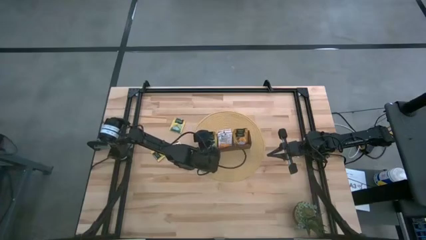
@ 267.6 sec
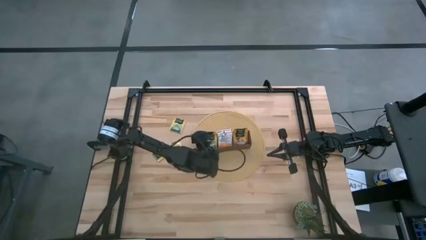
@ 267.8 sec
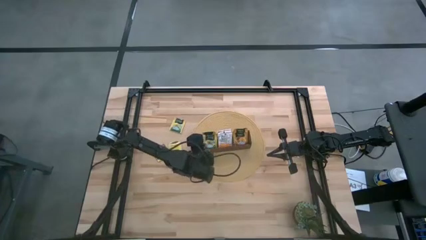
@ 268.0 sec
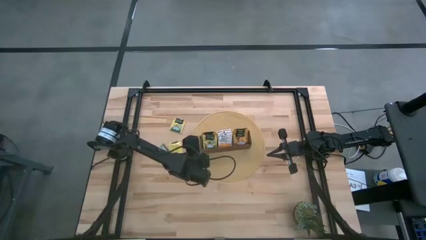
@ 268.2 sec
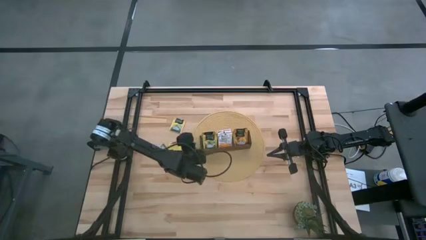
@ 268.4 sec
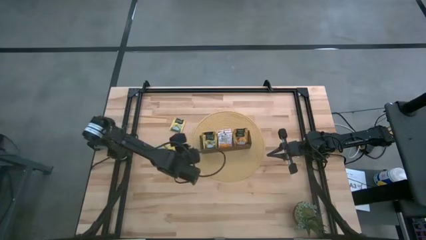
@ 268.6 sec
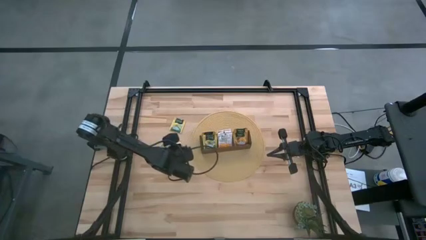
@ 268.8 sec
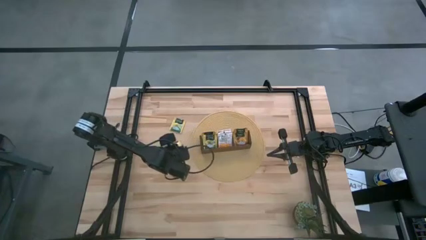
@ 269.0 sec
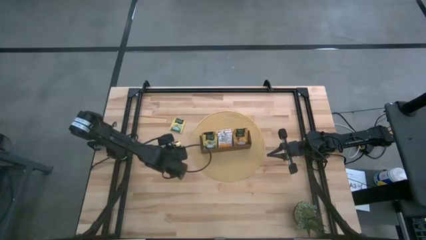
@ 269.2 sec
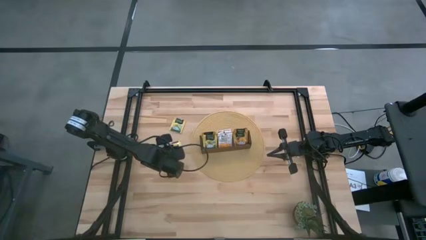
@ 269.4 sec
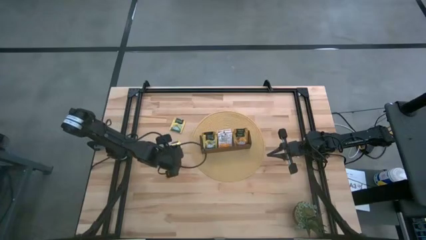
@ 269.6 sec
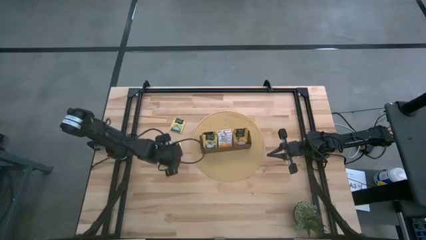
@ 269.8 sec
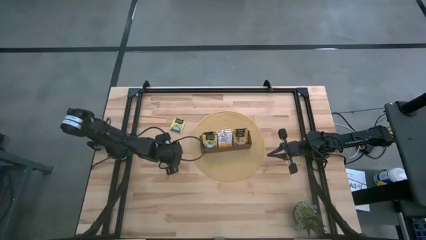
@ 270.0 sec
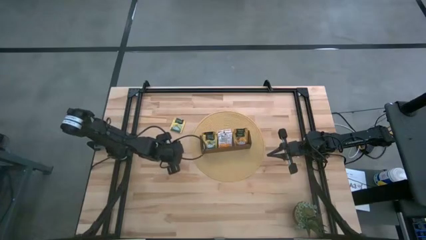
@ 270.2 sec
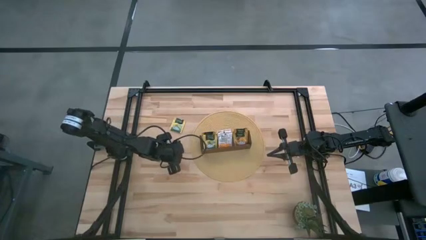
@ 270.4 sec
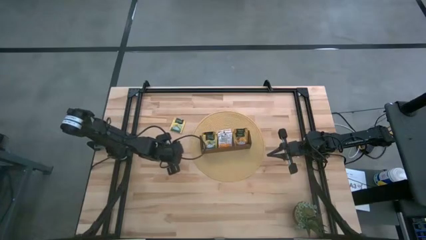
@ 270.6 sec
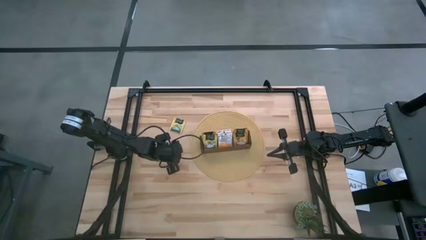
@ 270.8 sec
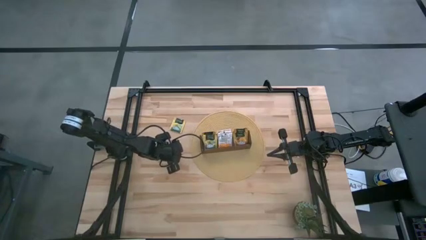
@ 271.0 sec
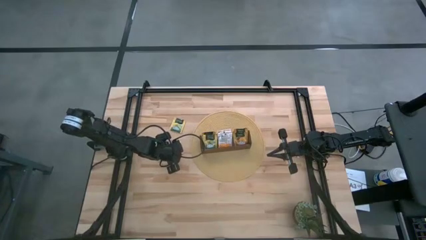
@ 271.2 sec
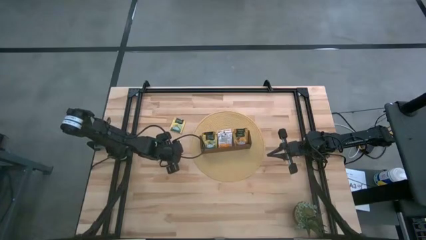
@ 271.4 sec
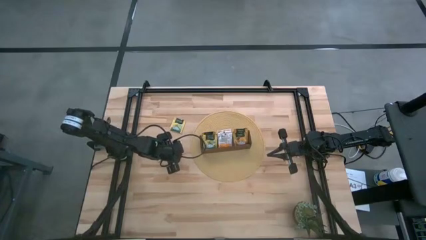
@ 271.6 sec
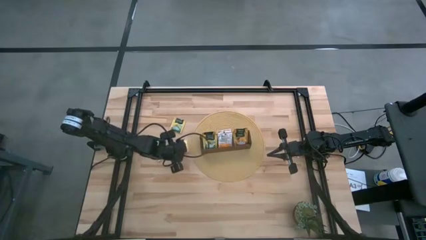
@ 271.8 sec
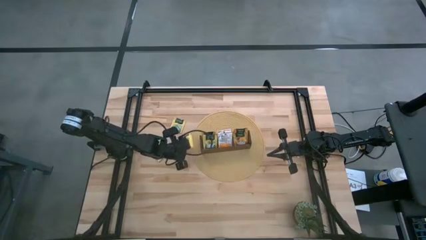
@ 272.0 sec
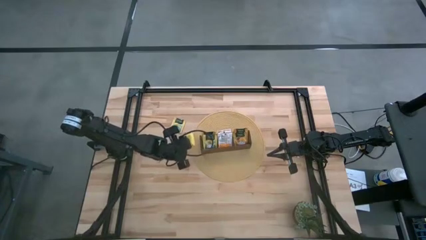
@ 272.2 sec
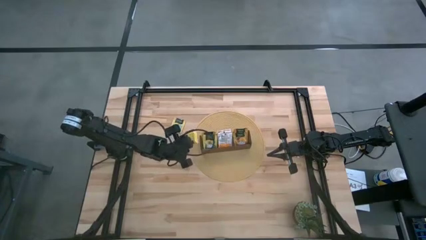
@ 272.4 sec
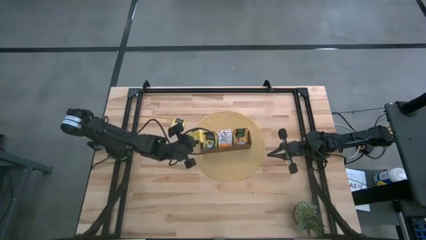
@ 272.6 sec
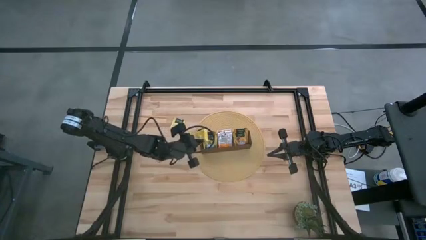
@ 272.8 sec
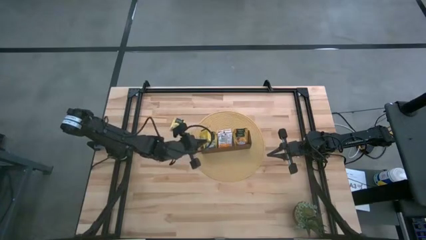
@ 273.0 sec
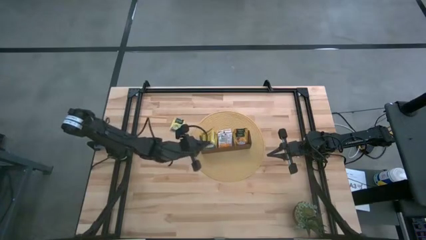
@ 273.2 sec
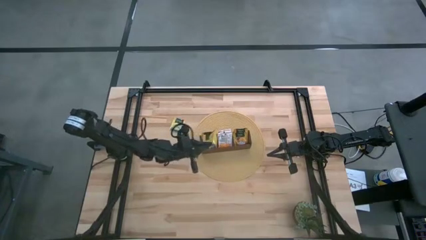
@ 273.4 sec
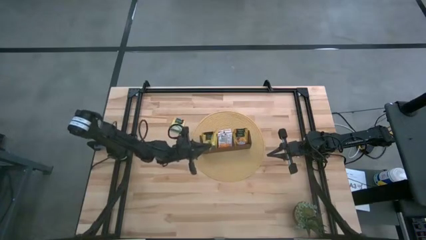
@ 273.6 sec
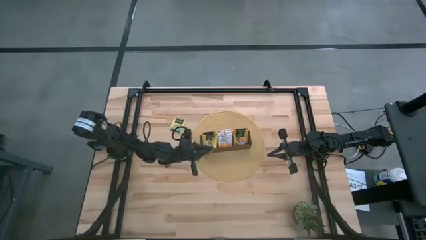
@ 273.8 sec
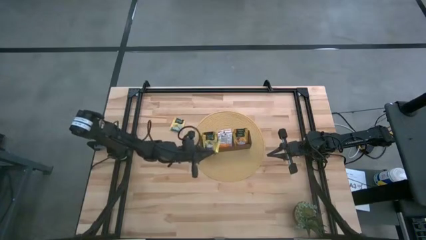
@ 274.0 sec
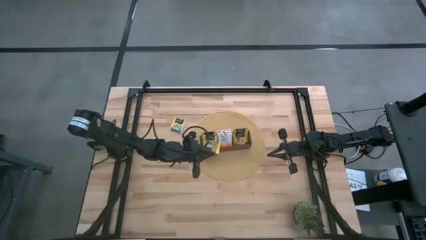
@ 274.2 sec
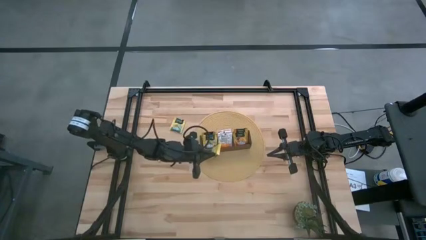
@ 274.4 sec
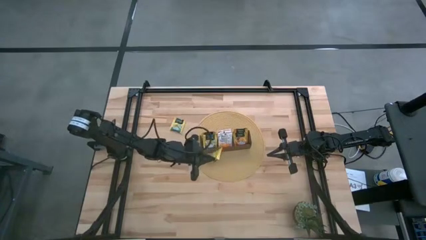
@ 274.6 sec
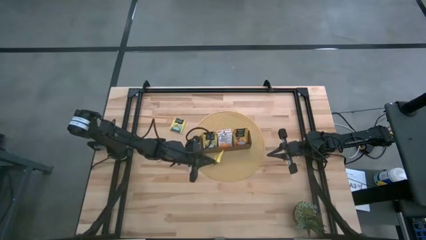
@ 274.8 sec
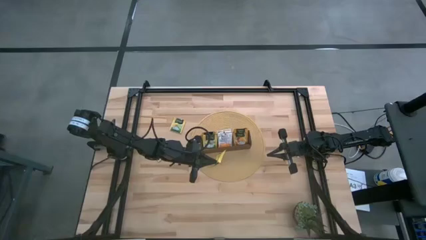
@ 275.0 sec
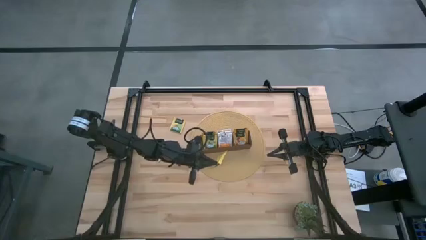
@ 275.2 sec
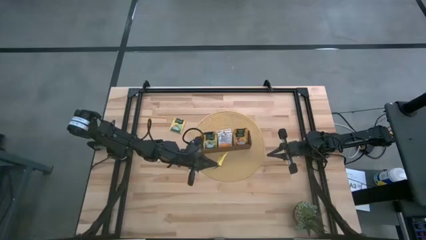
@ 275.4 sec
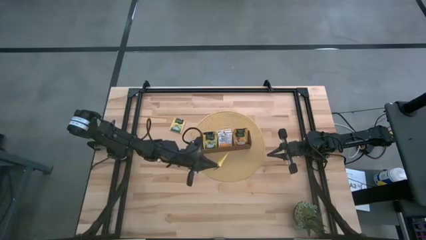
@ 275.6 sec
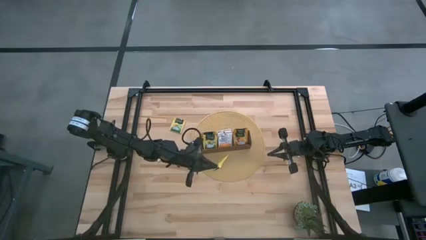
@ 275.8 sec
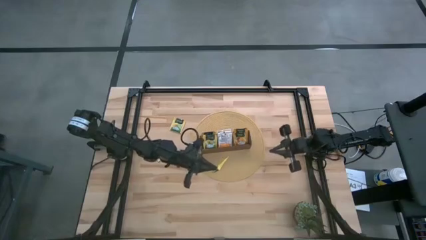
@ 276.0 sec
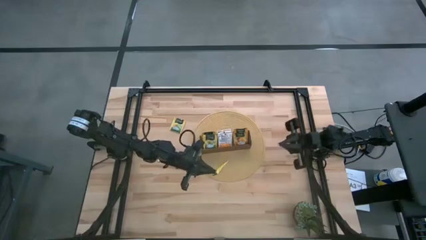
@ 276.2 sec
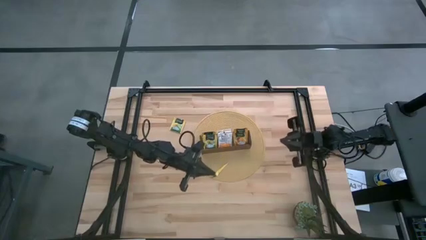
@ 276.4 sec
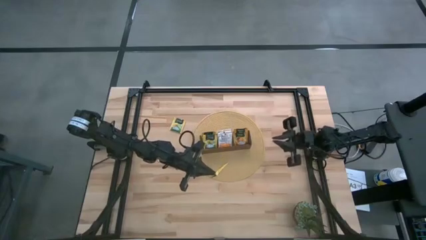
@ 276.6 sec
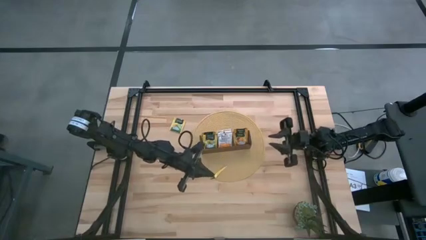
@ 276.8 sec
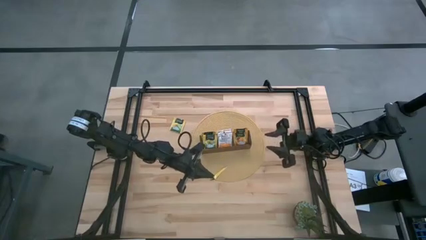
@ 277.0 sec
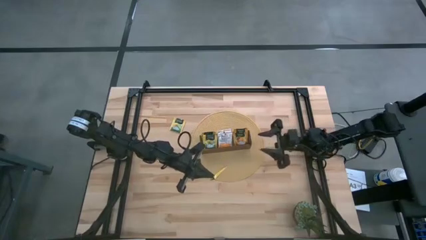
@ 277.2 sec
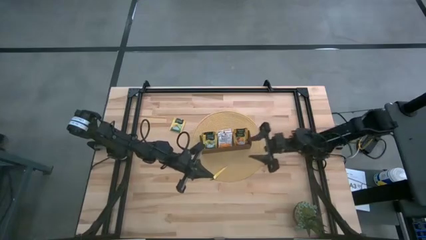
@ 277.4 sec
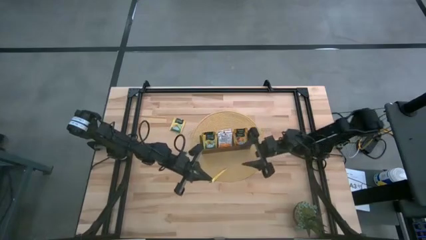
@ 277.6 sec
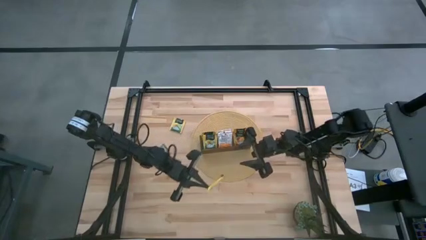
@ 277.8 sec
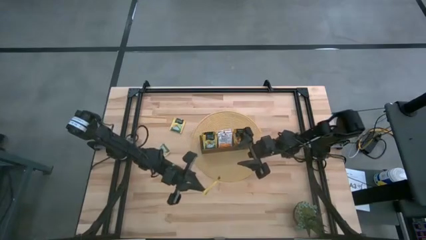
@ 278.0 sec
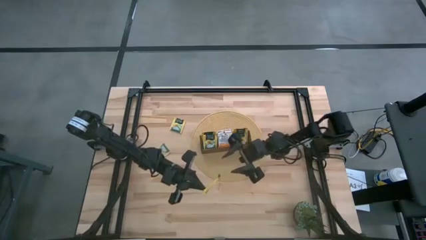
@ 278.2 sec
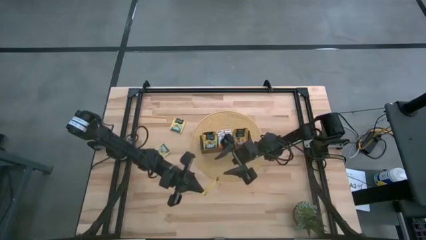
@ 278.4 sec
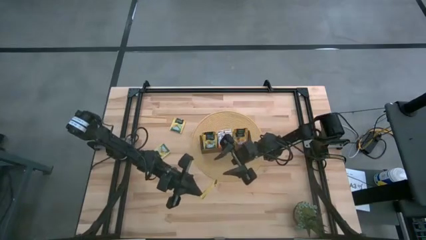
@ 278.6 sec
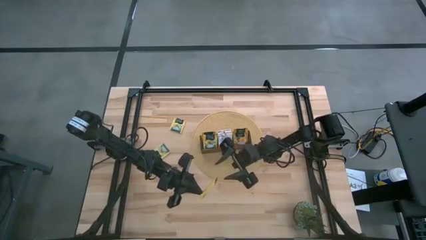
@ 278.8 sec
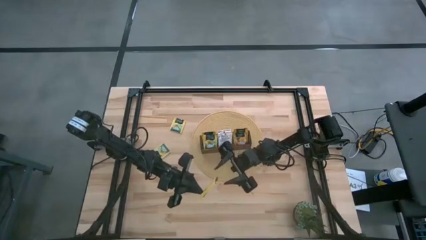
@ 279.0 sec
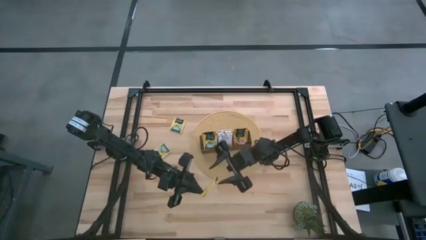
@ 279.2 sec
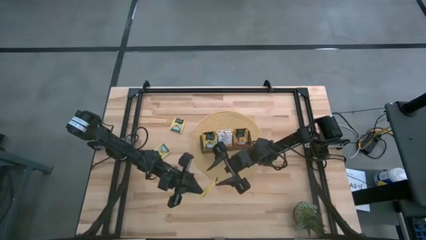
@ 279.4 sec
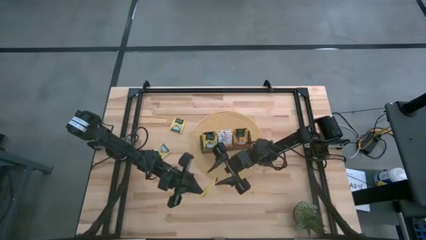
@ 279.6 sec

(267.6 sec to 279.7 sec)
Task: Pick & Place Tea
Put the yellow tea bag into the left section of the wooden organizer

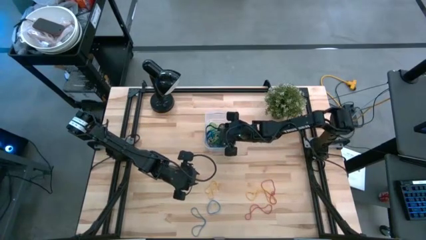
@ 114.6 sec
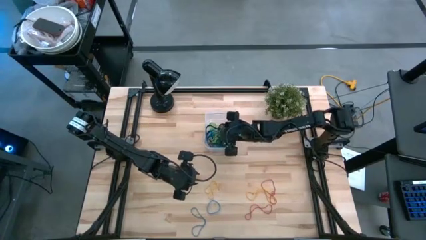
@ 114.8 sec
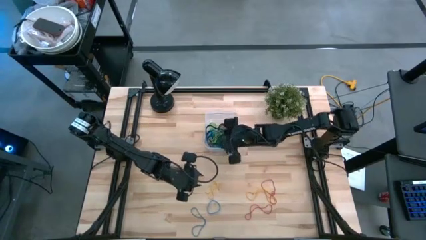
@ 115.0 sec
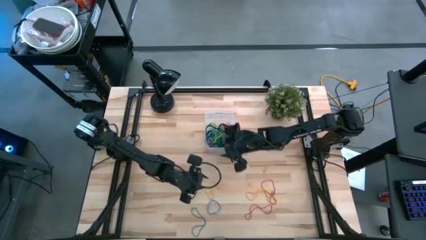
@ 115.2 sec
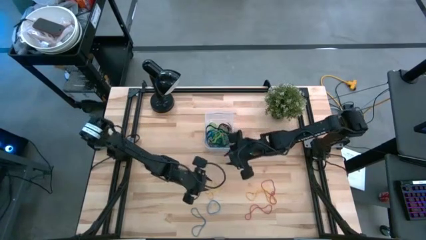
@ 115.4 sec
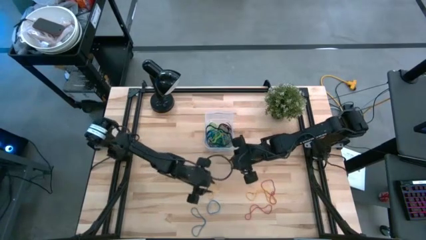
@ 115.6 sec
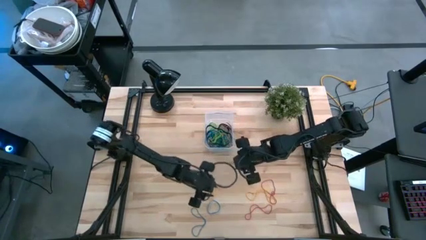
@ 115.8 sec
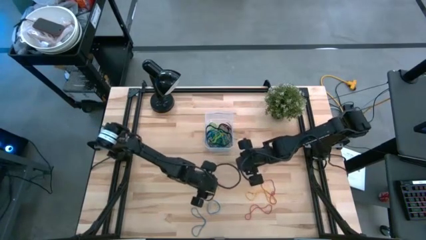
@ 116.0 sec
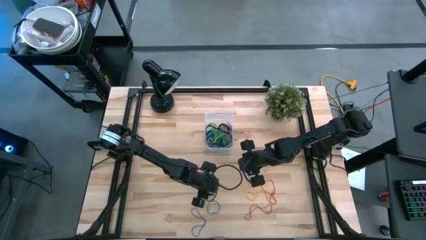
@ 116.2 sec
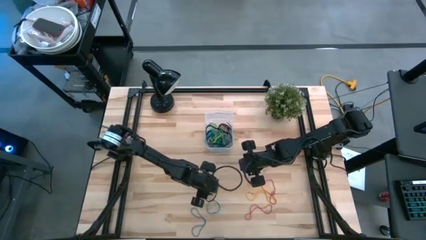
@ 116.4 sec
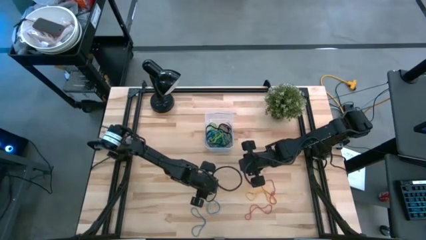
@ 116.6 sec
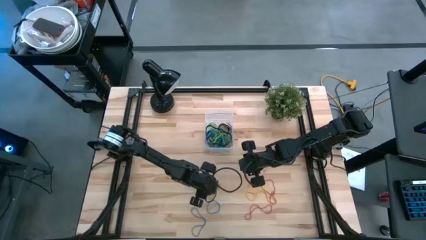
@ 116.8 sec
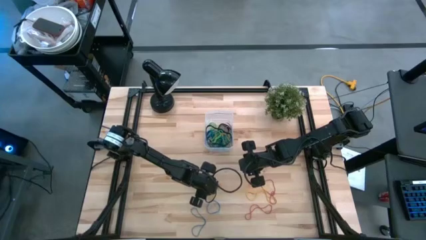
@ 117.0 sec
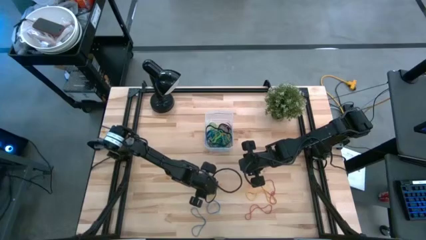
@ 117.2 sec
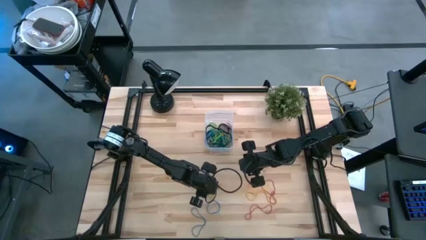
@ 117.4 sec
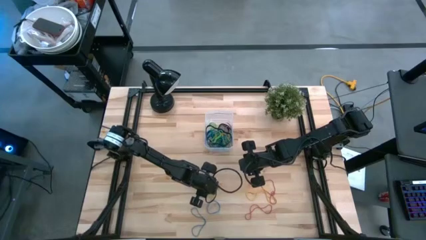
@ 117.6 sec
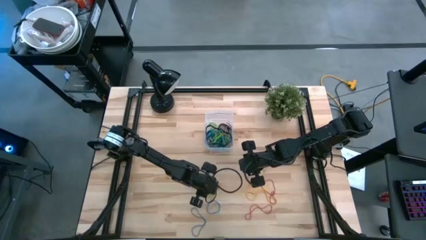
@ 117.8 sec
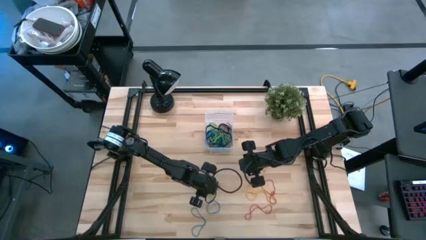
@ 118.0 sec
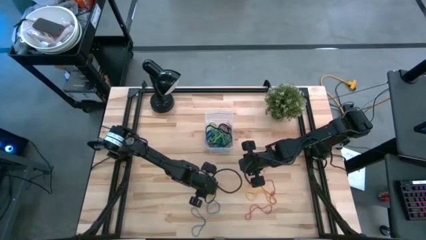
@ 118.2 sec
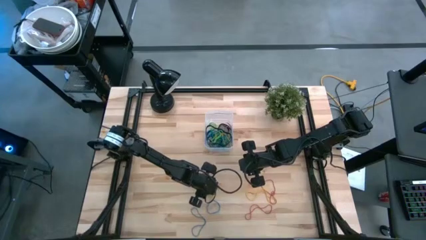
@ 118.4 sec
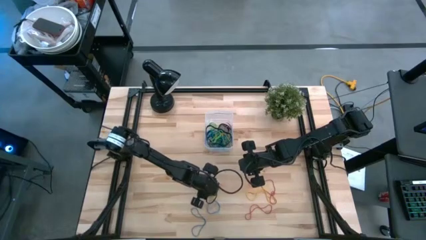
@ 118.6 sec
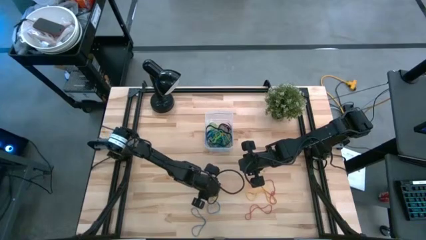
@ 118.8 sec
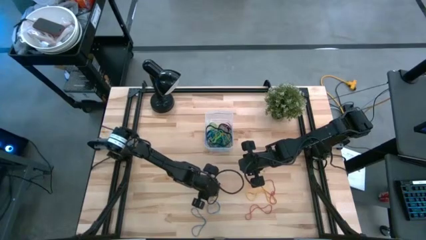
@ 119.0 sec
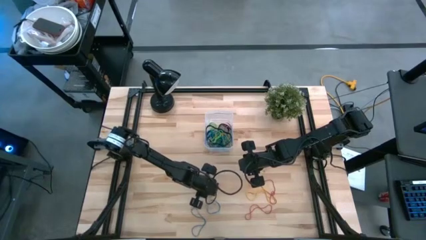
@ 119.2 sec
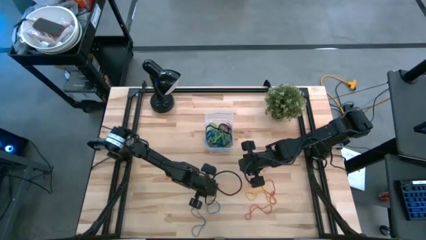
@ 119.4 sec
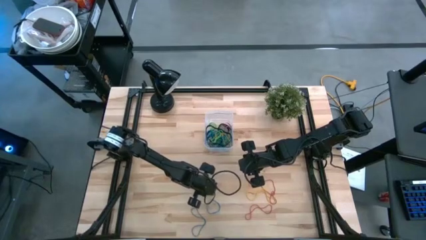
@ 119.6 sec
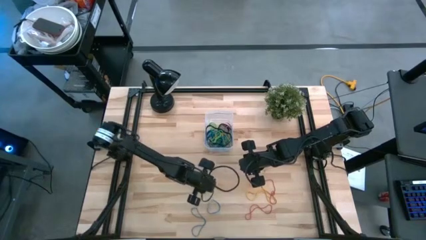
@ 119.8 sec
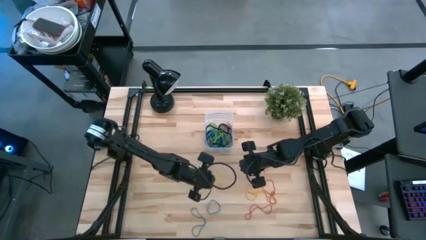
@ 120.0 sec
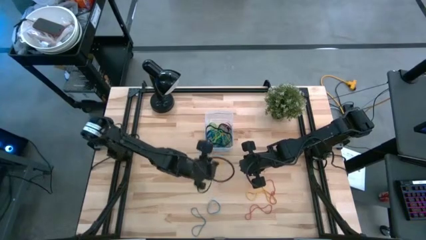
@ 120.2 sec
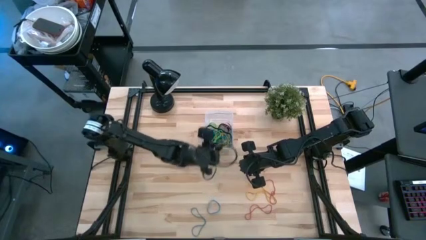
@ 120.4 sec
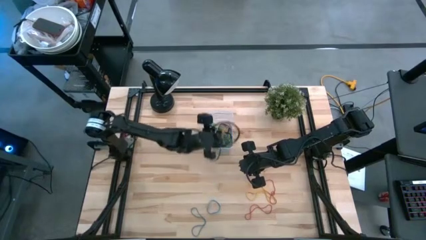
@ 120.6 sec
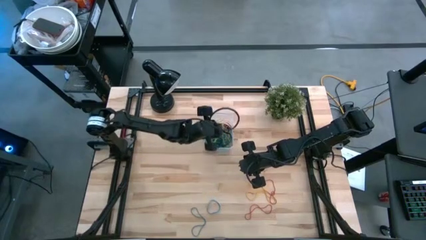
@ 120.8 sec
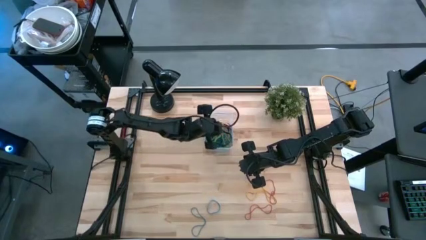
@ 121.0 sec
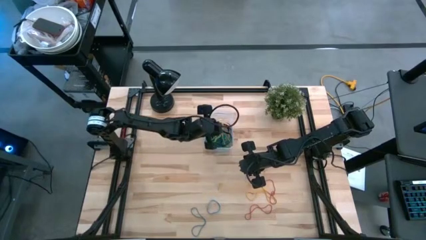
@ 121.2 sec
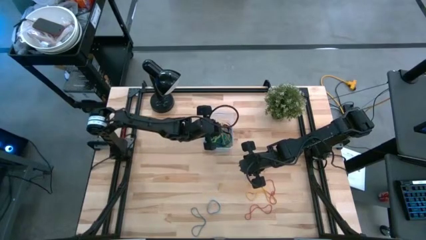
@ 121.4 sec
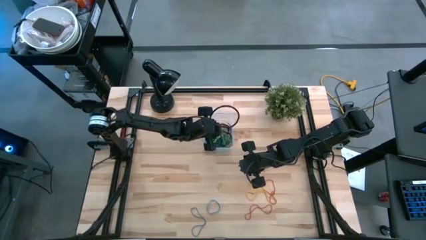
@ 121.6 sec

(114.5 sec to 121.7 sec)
Task: Pick and place rubber bands into bin
Put yellow rubberband into the transparent bin
